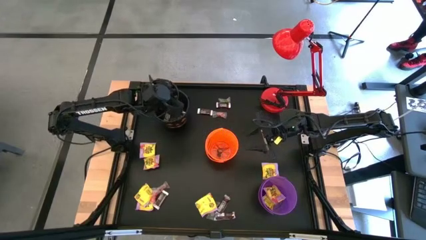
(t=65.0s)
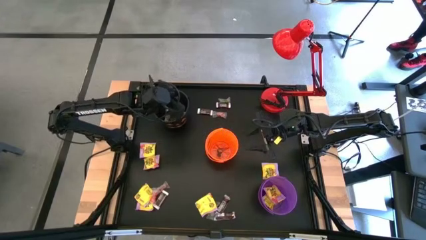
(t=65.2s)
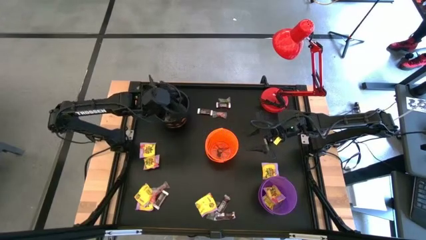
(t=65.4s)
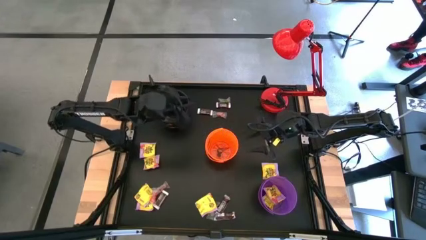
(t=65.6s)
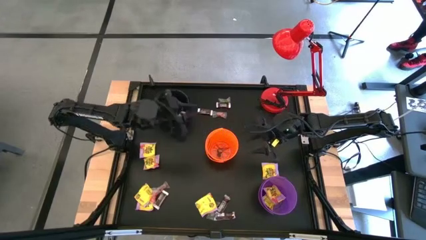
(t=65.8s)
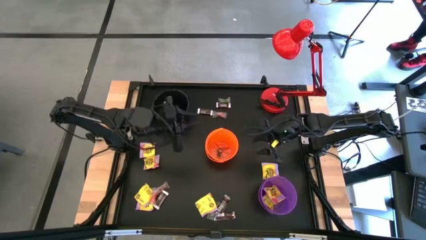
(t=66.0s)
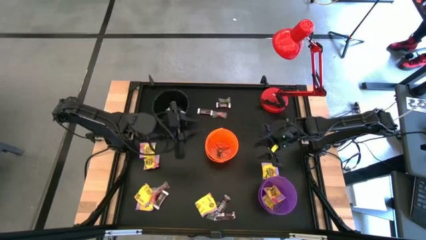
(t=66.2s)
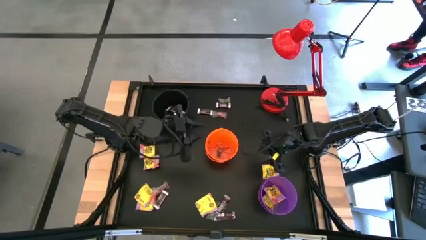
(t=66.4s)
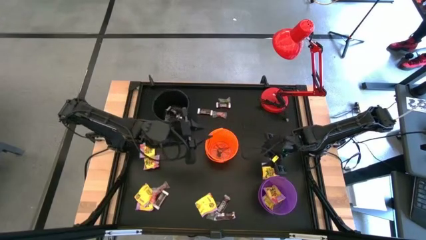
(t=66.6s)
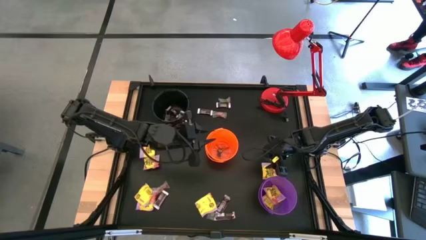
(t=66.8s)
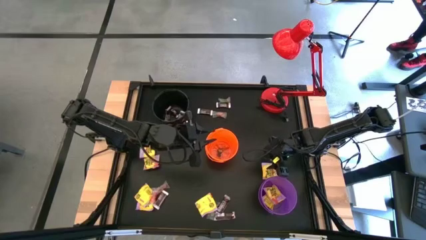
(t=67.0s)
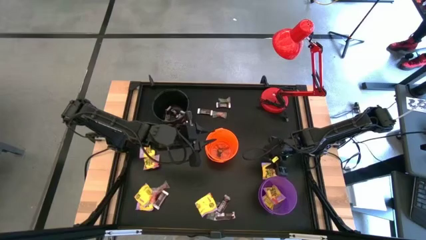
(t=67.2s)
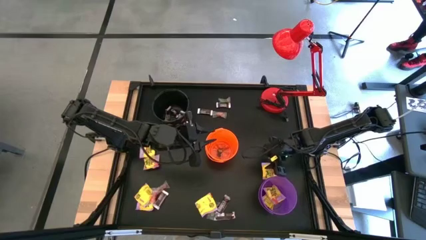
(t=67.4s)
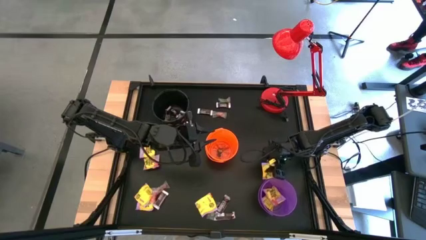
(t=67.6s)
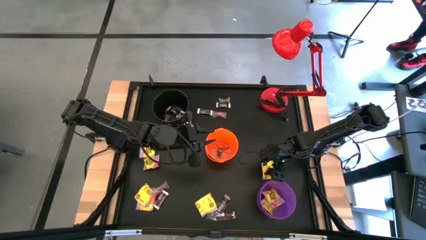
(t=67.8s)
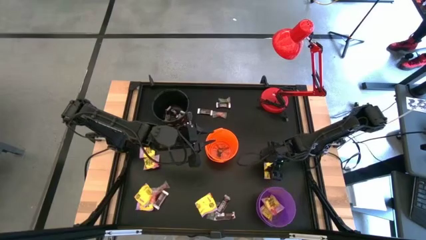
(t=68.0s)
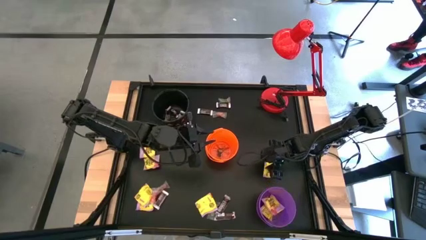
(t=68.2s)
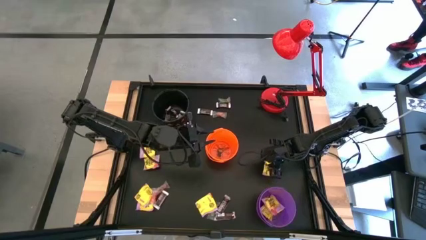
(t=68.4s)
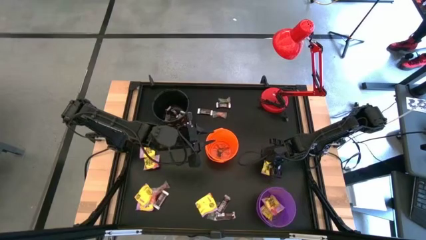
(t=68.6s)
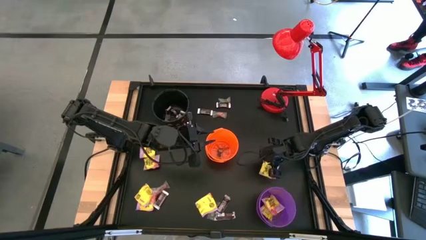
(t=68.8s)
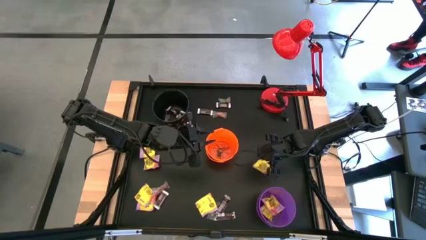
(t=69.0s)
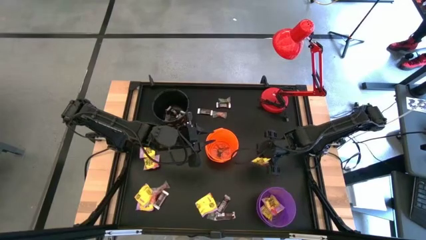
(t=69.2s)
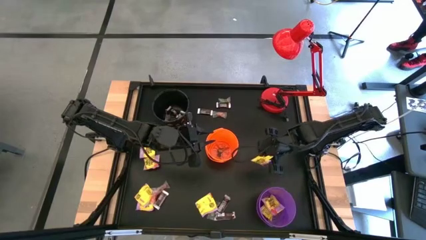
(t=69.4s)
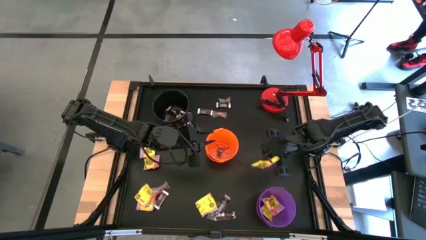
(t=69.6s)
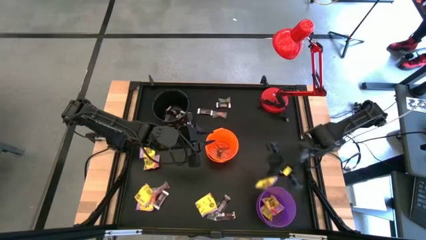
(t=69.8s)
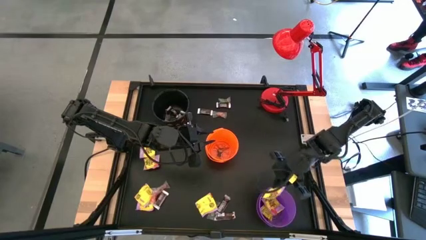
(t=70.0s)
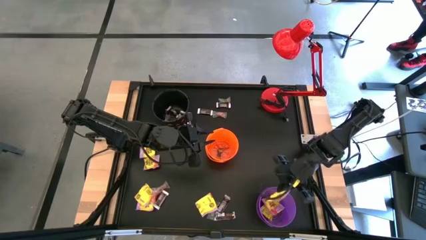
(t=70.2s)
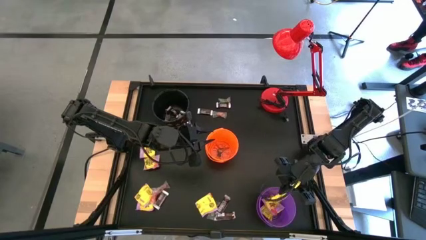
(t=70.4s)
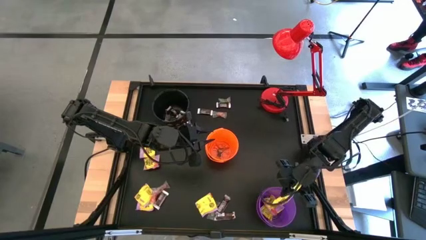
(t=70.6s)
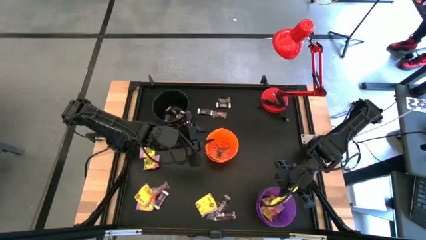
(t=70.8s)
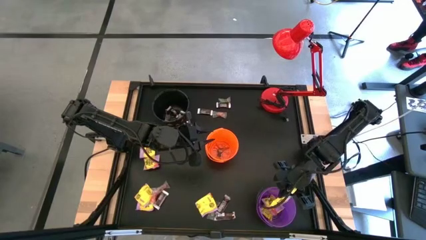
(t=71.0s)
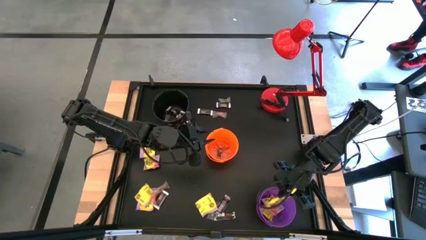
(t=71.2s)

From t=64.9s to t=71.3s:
Task: Sort candy
Put the yellow candy into the purple bucket

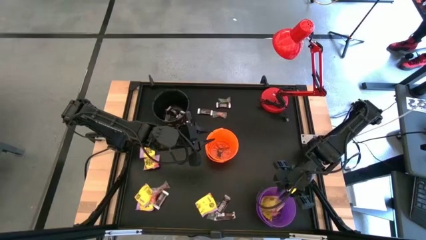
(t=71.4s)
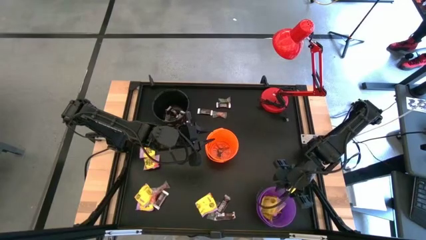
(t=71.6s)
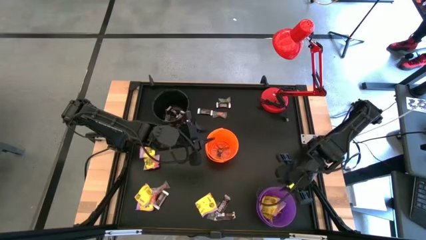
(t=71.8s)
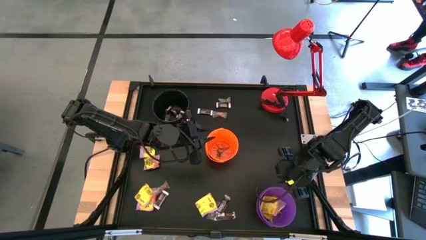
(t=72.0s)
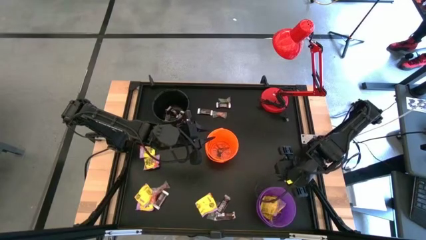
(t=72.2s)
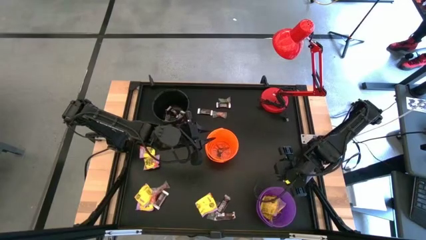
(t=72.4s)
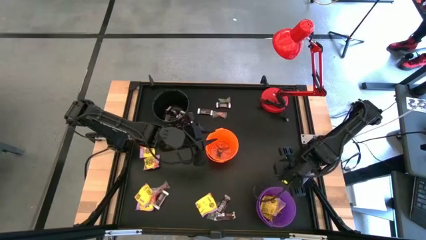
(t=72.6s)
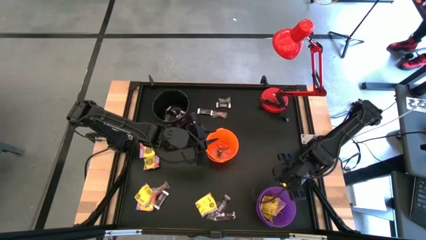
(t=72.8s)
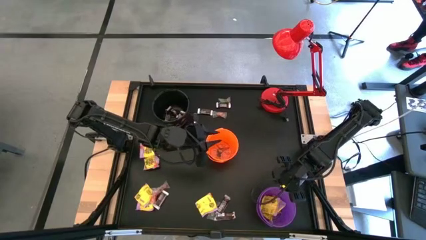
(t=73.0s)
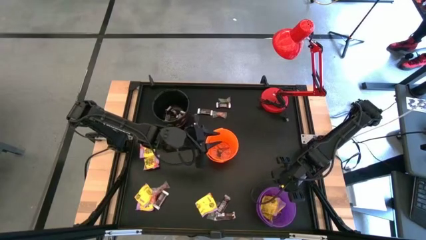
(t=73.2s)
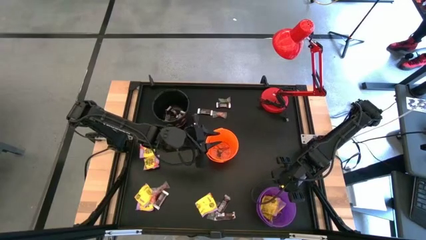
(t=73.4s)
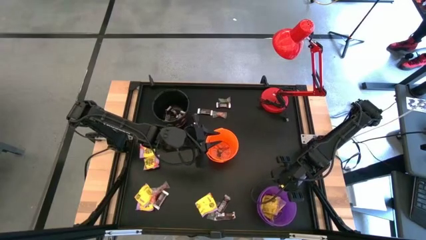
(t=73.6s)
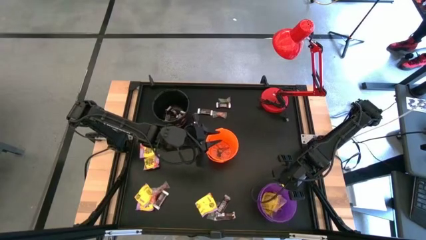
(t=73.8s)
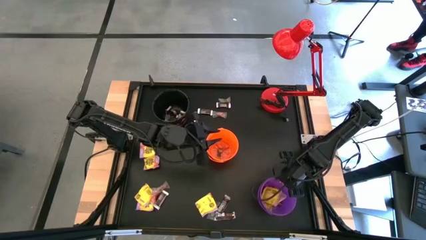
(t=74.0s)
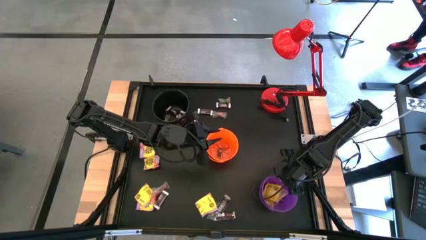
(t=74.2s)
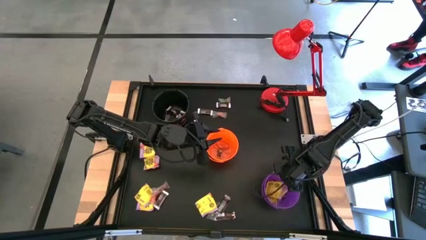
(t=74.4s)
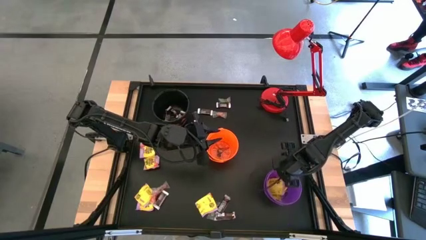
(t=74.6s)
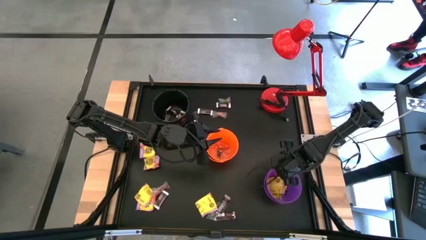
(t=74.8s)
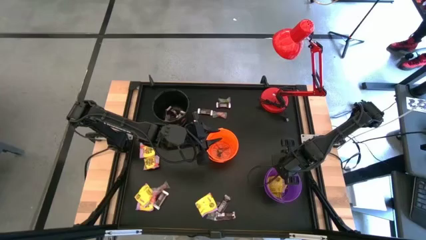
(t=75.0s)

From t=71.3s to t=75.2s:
Adjust the purple bucket

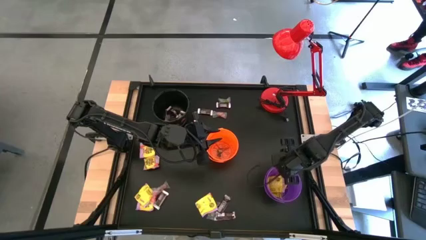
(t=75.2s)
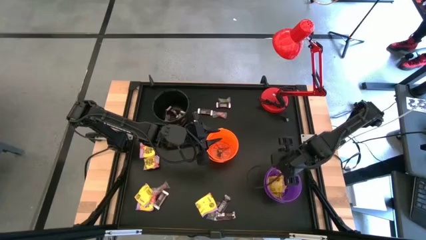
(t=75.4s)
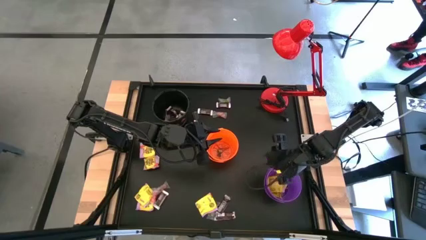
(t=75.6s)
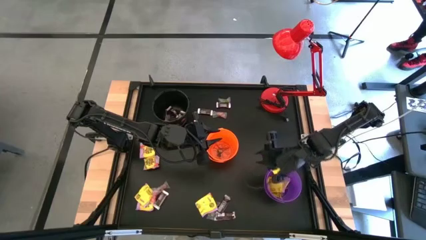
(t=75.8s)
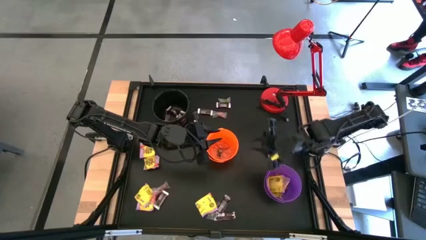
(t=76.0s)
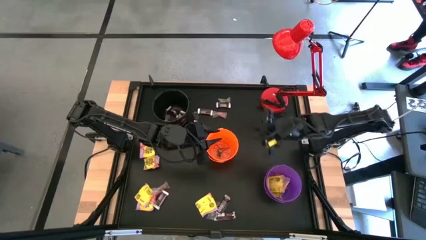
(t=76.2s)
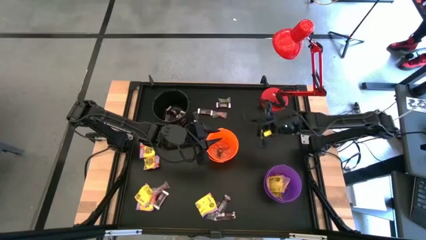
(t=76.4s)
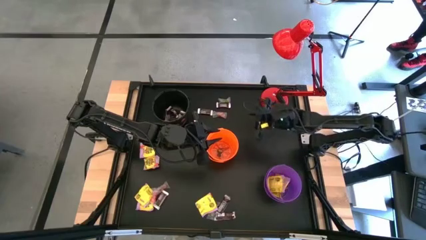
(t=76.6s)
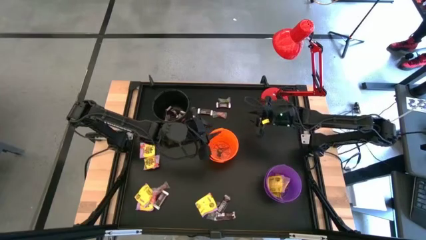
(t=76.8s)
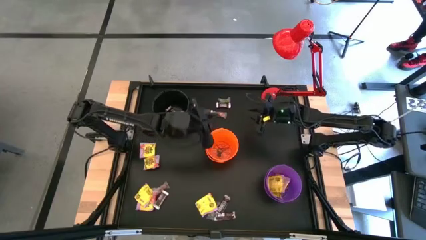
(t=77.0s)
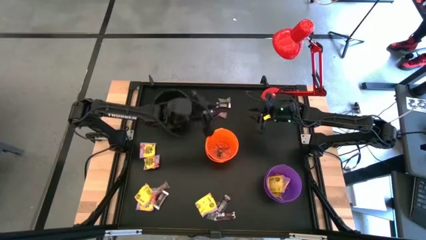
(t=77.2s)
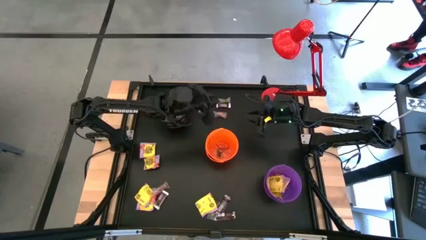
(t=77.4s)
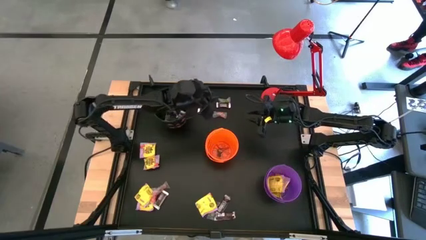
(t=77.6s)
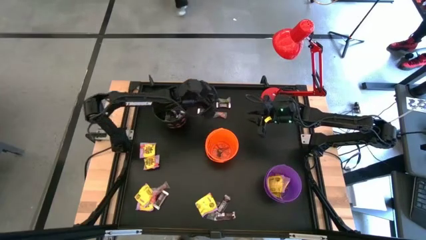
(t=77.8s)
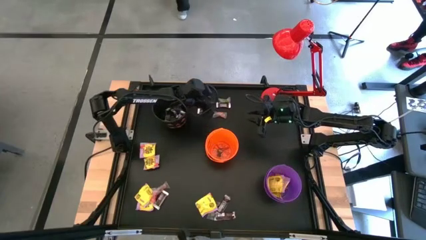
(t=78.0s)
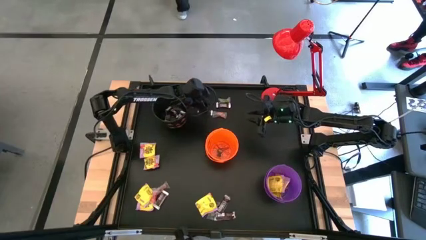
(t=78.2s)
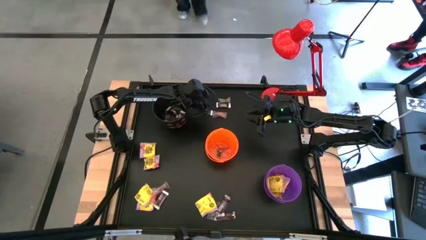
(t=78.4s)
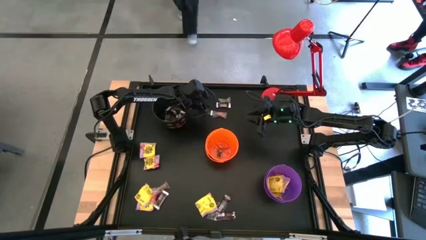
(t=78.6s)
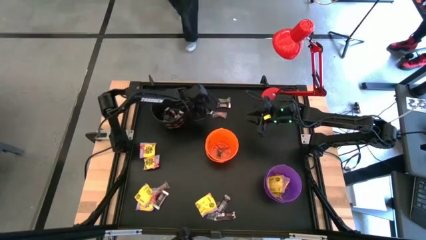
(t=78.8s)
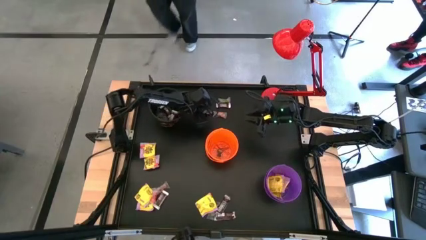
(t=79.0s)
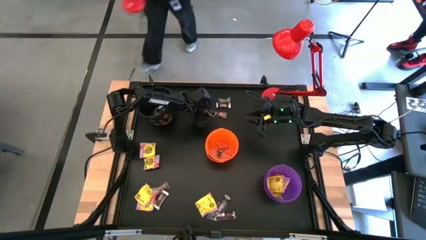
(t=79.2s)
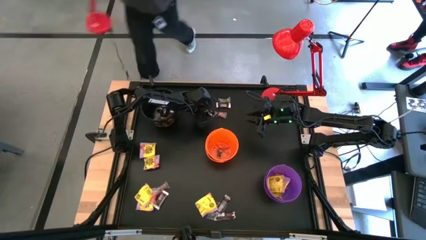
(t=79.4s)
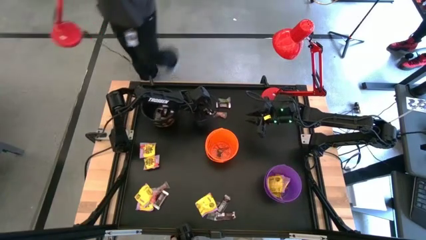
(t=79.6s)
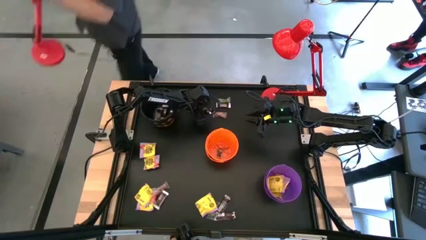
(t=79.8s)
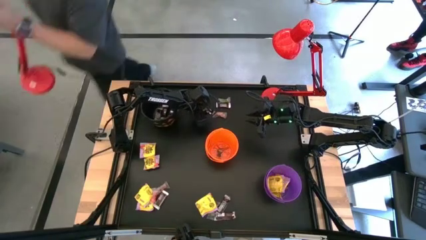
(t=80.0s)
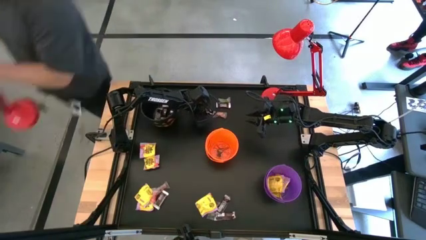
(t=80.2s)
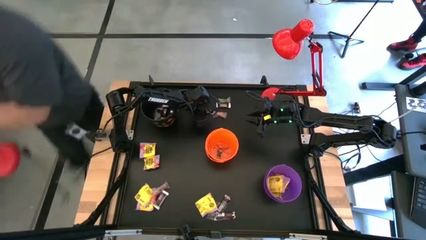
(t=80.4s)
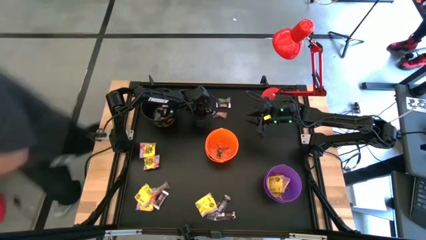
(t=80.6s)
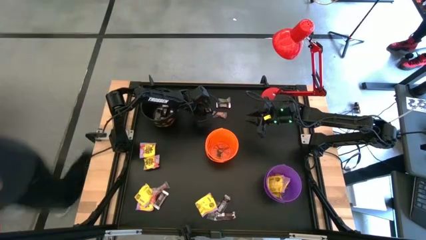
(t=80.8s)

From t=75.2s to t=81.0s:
Put the brown chocolate bar into the black bucket

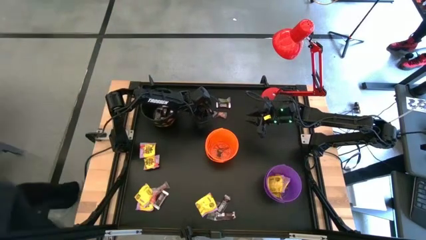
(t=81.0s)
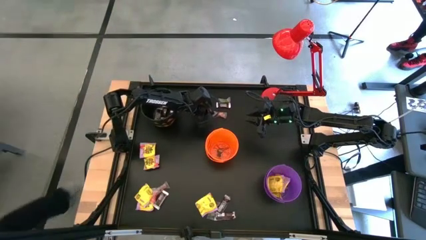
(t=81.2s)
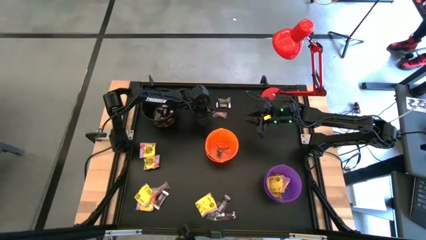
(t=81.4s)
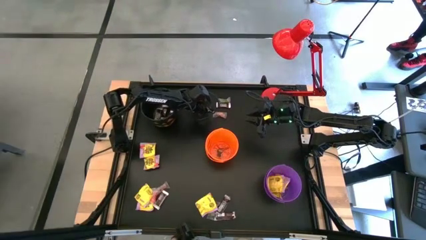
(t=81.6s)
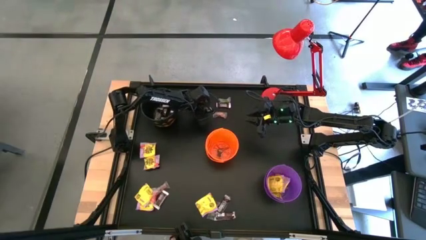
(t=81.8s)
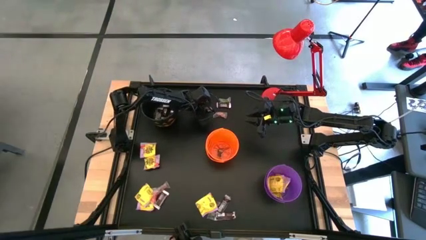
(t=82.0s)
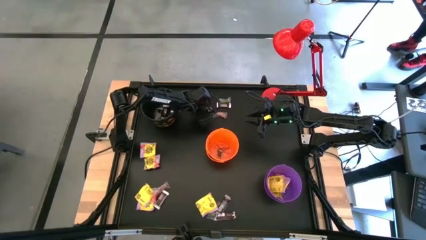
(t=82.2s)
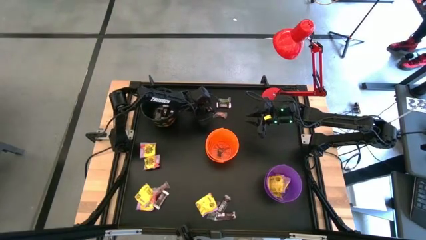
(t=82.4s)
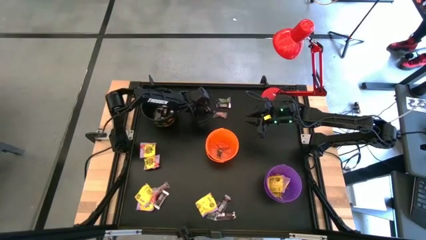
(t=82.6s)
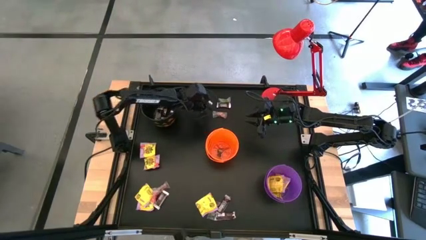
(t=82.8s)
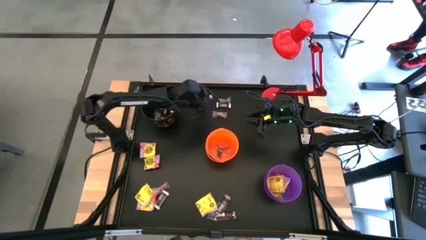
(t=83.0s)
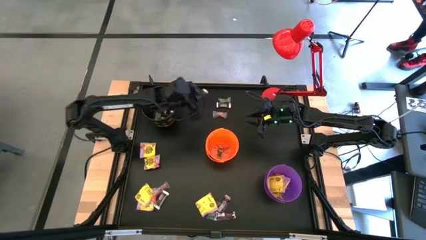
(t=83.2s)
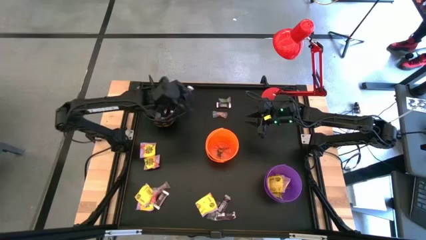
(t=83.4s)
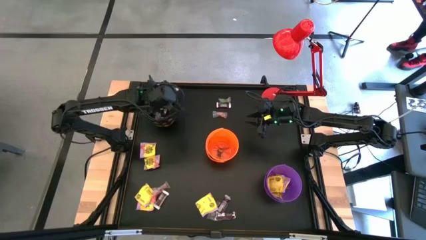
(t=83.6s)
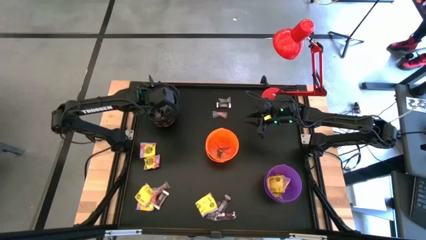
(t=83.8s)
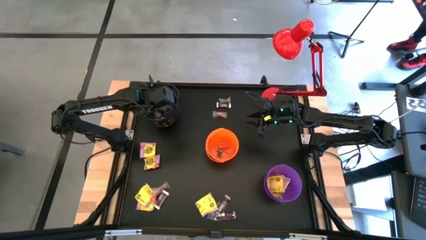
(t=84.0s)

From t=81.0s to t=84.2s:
Put the brown chocolate bar into the black bucket
